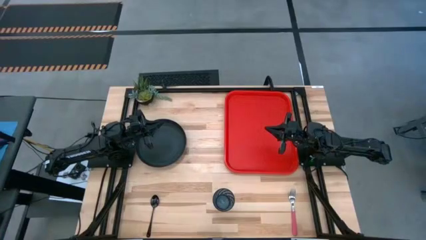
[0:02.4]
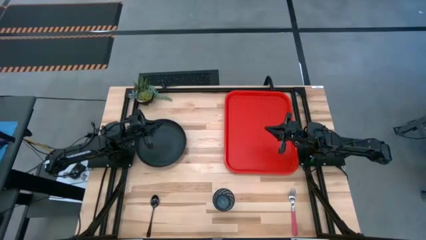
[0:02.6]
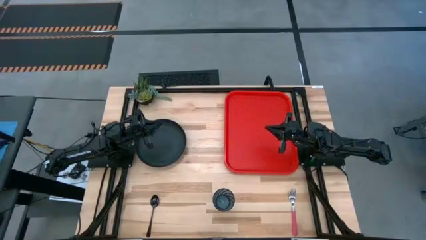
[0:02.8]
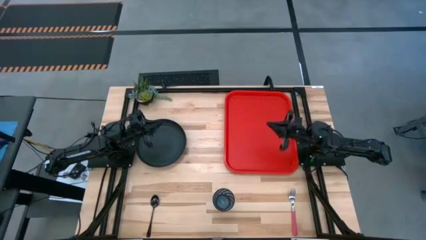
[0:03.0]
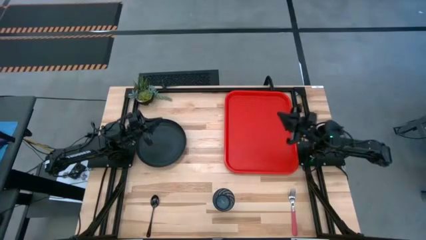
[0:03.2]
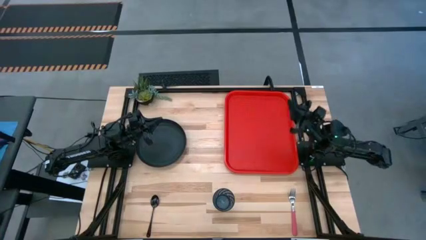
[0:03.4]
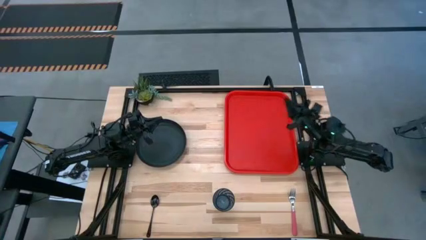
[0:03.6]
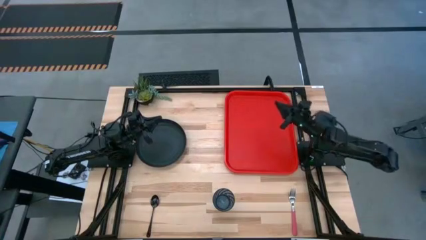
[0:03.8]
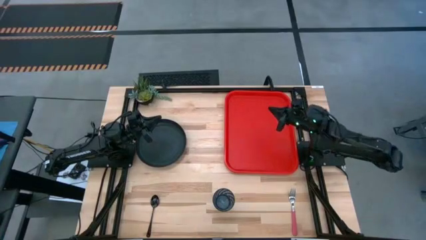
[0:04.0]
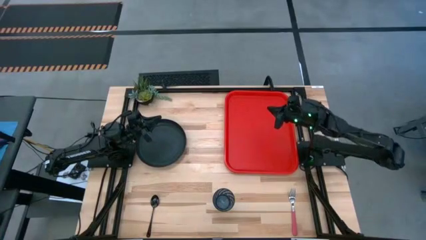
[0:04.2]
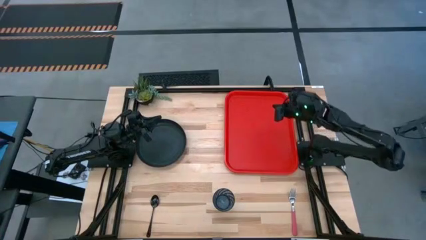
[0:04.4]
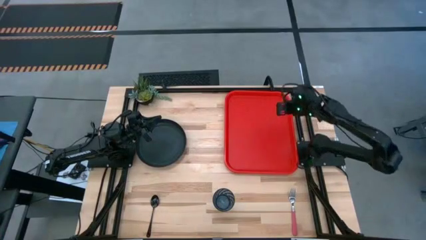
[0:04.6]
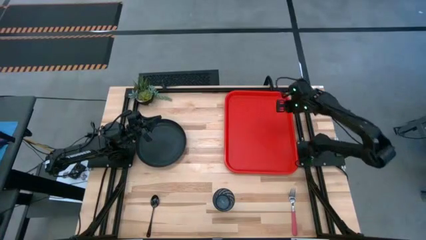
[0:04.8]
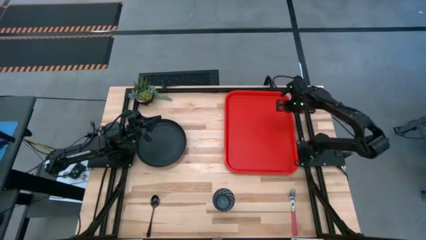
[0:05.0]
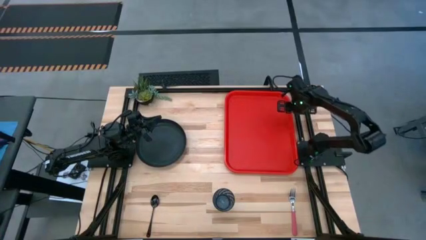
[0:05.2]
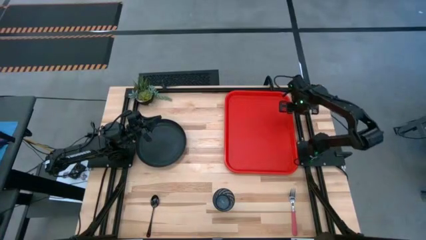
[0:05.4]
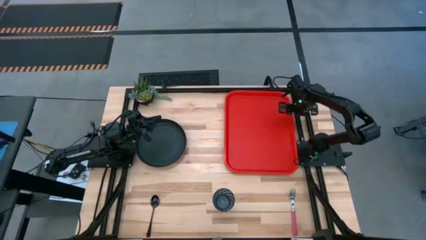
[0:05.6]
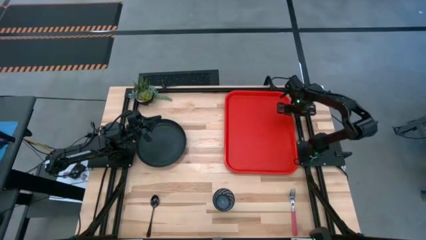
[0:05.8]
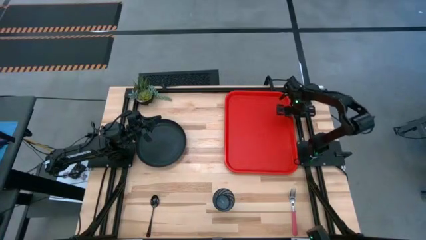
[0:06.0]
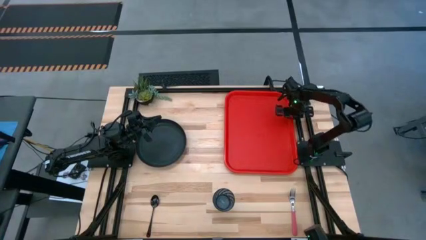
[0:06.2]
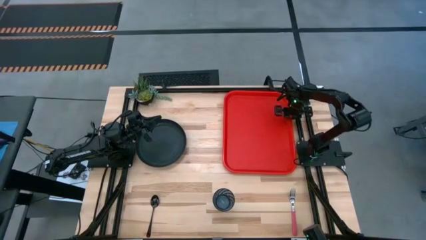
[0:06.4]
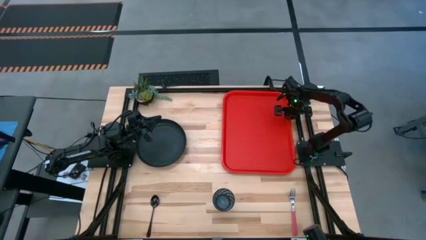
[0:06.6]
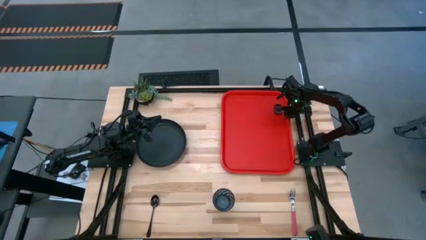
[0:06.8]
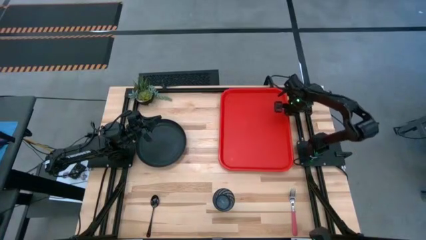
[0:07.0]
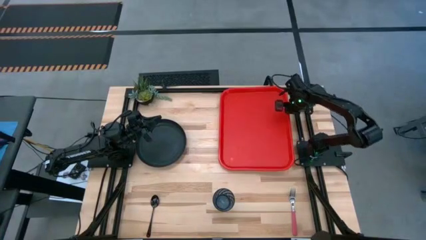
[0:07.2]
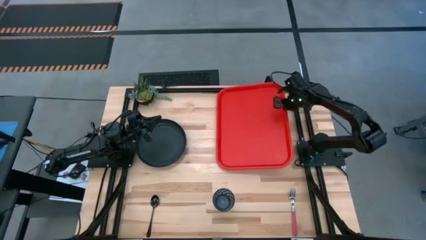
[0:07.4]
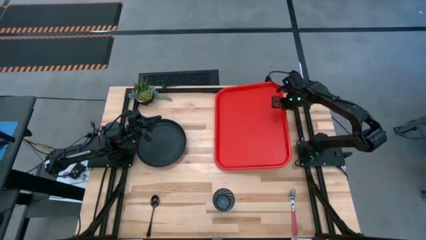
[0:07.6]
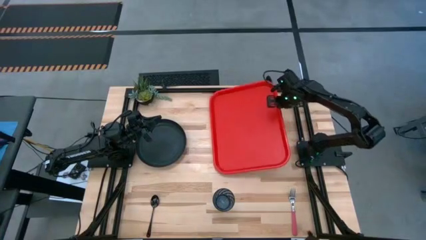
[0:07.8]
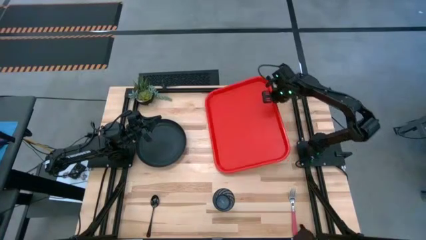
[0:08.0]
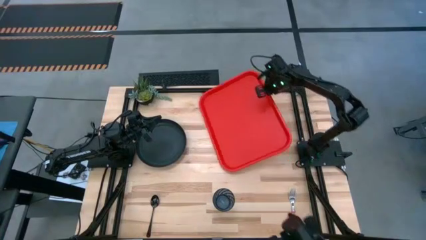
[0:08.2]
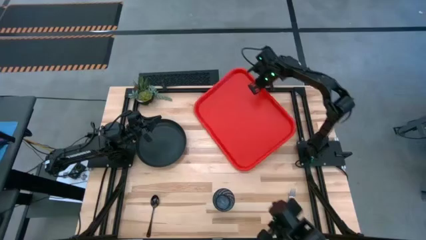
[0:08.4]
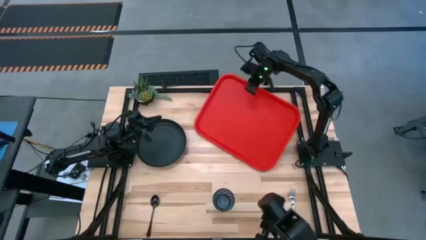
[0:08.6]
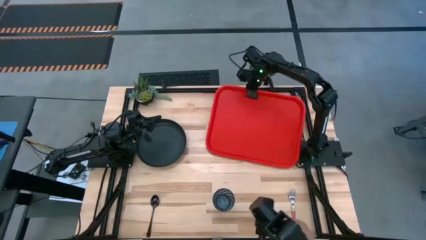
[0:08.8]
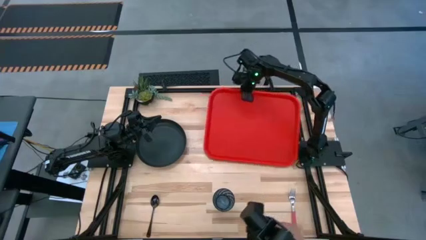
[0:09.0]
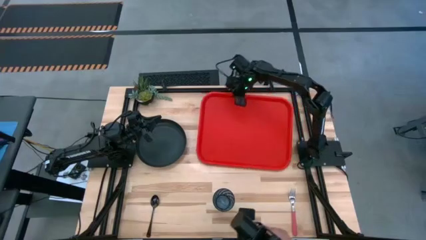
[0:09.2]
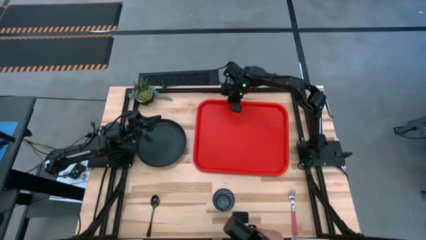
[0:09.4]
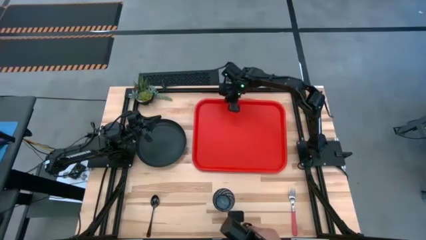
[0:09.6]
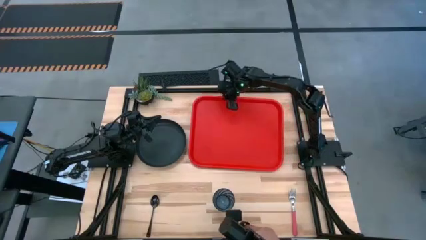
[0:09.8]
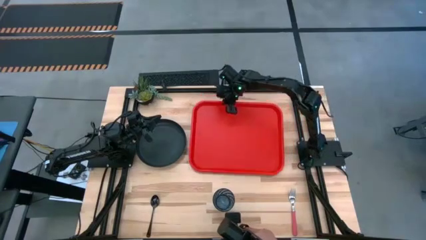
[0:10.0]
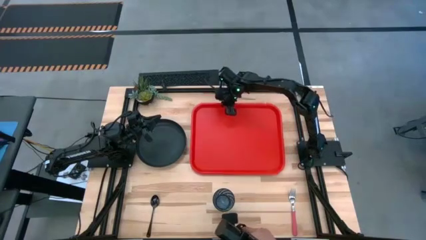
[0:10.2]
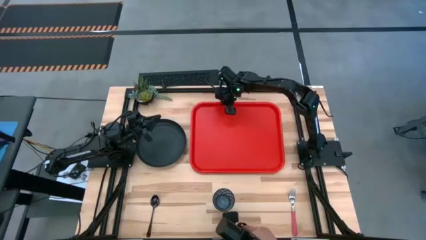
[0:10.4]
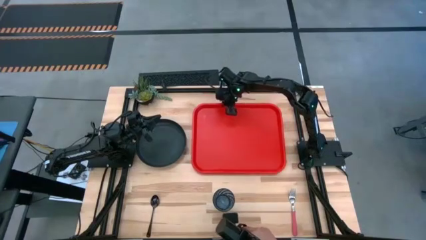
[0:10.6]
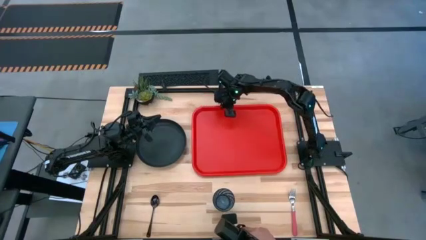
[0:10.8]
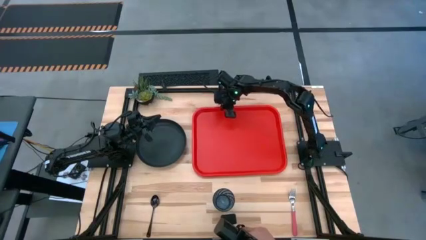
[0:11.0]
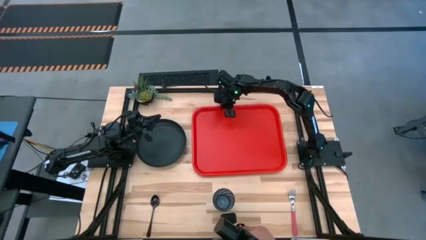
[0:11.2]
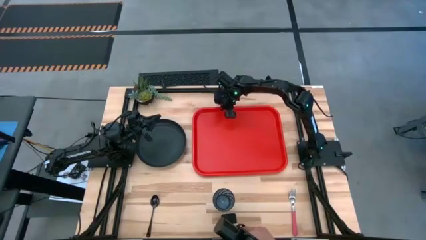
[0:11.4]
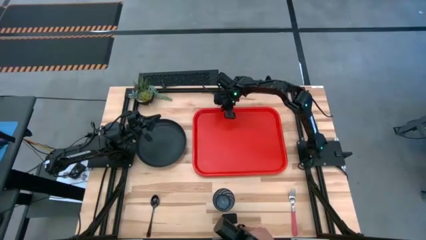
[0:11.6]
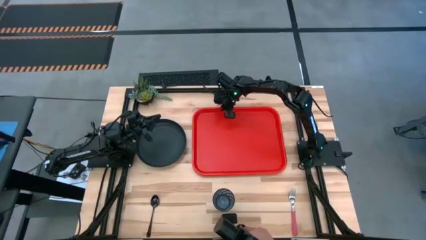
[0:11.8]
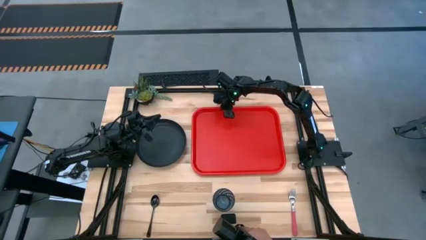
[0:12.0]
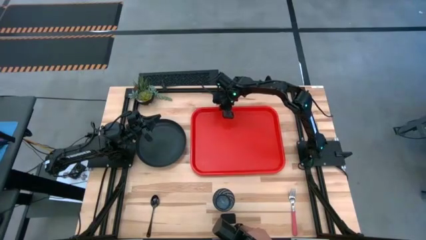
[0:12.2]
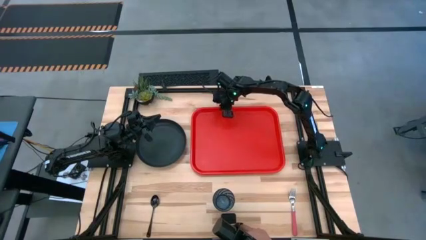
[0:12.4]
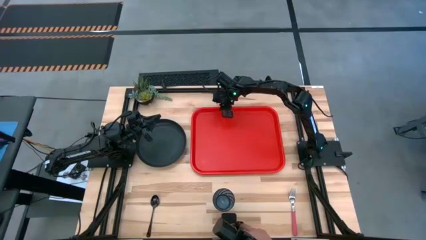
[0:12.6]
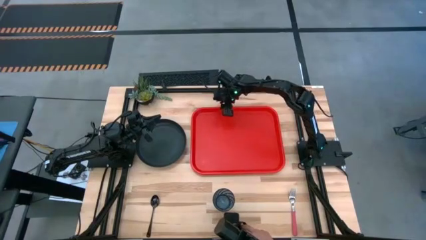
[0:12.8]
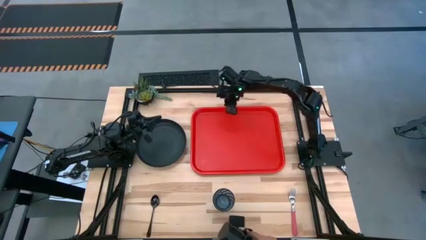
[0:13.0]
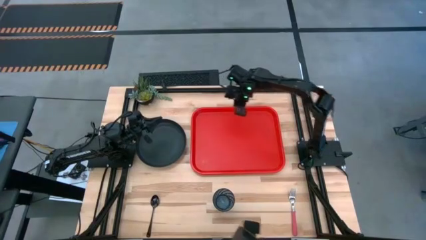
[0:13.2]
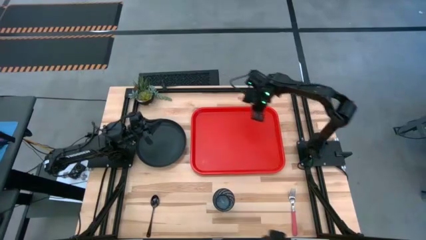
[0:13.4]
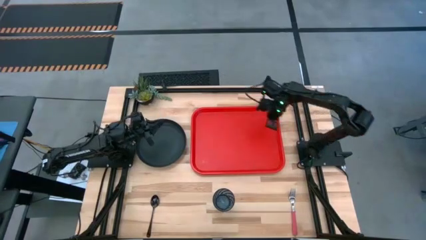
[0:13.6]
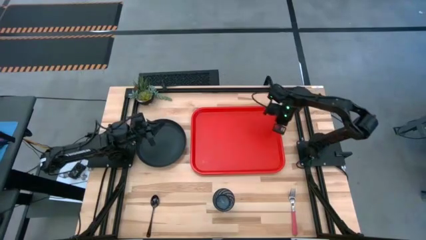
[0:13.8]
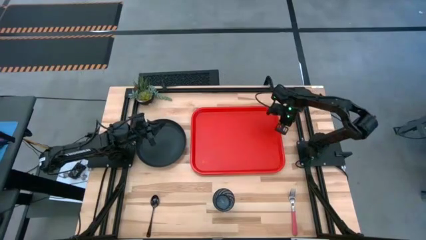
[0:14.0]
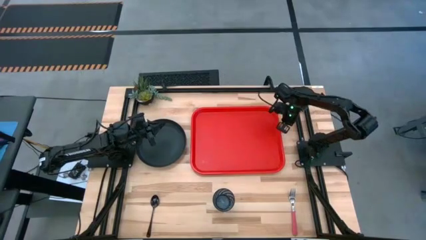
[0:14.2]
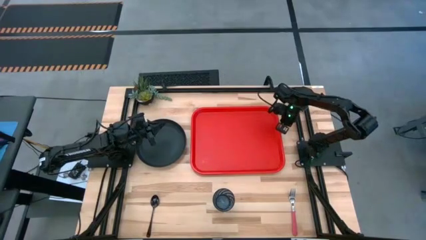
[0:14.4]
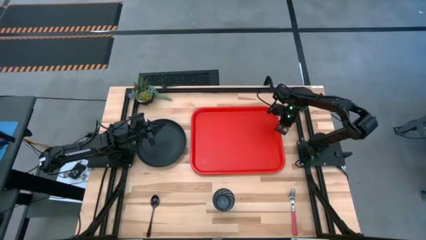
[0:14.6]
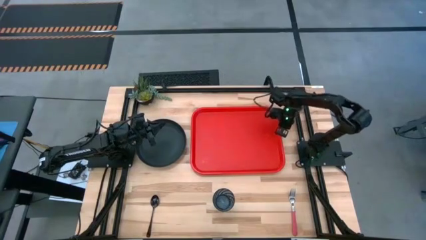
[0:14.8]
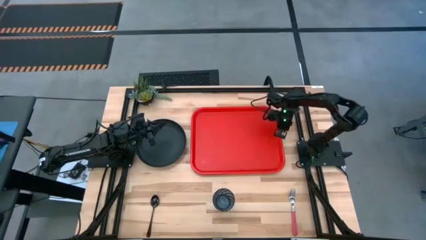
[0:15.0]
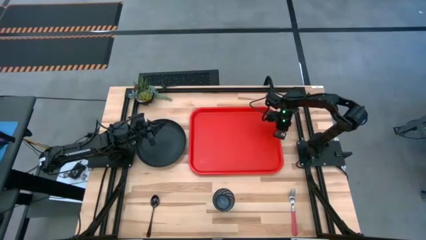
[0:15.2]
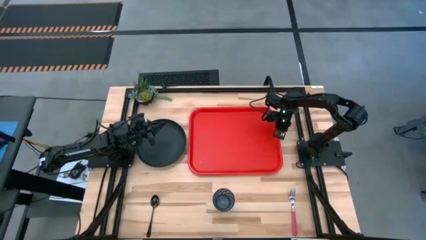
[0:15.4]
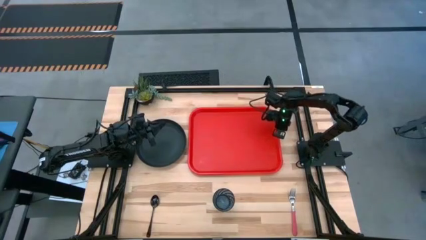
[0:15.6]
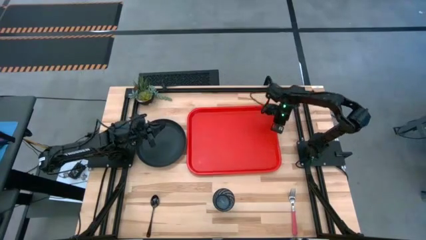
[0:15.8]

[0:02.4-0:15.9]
Task: Pick and place plate/cup/fork/spoon on tray
Prepare the red serving tray

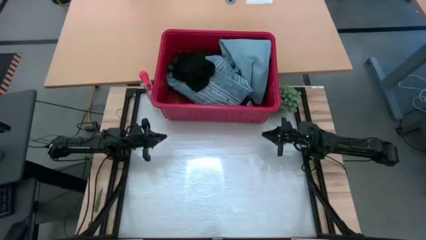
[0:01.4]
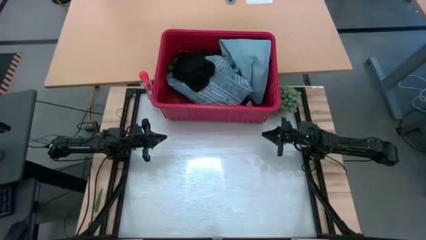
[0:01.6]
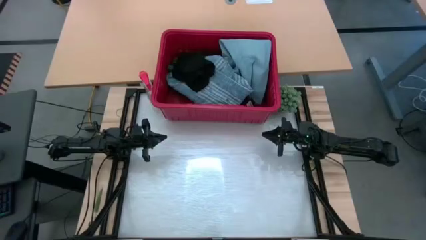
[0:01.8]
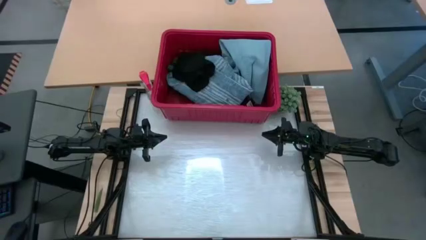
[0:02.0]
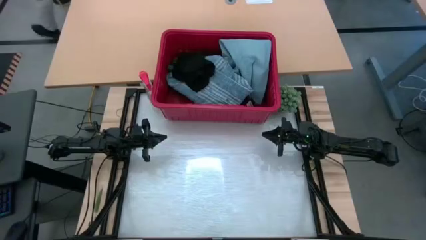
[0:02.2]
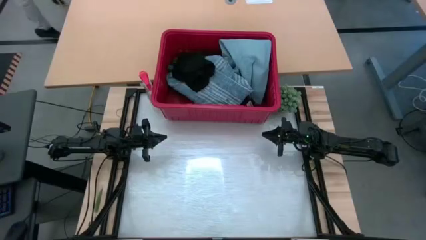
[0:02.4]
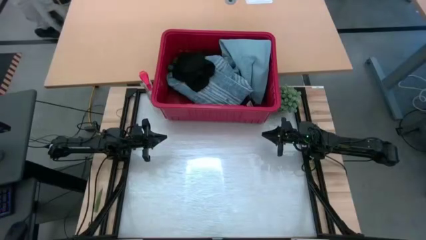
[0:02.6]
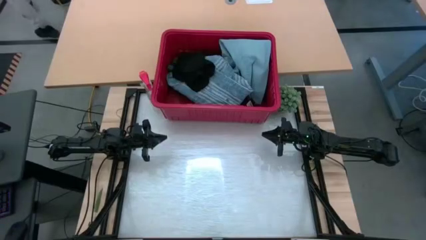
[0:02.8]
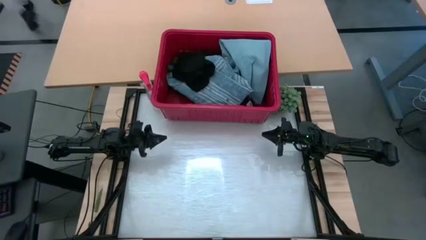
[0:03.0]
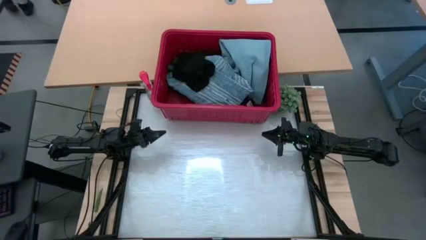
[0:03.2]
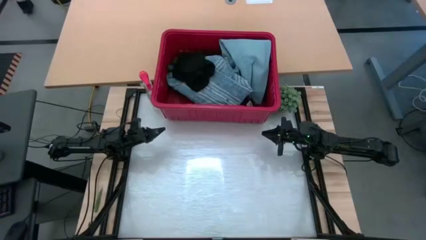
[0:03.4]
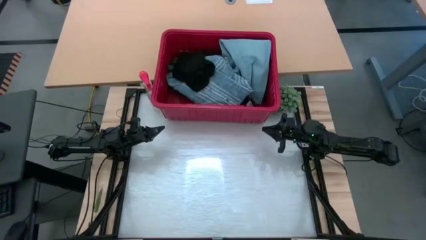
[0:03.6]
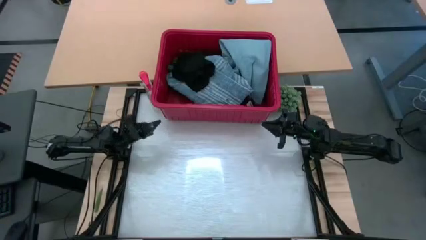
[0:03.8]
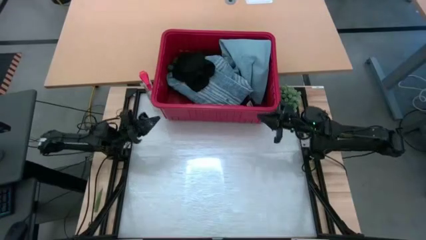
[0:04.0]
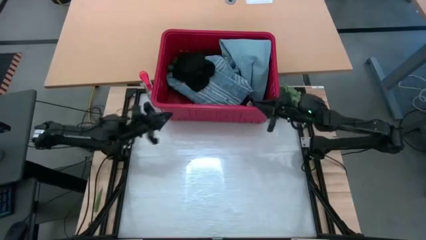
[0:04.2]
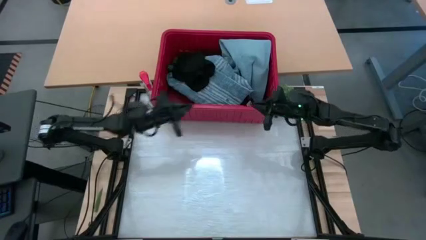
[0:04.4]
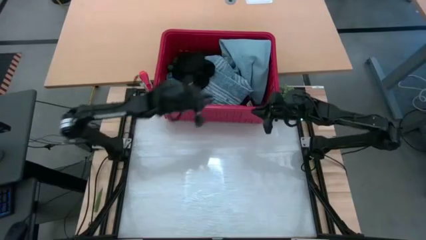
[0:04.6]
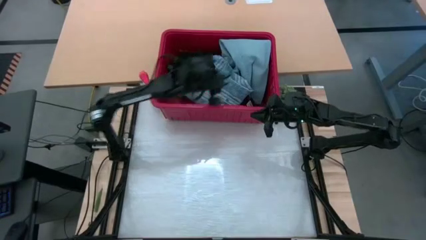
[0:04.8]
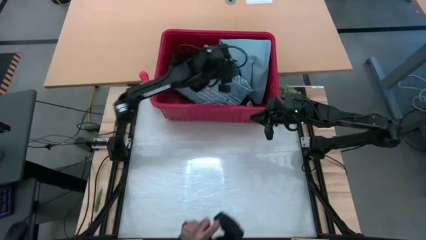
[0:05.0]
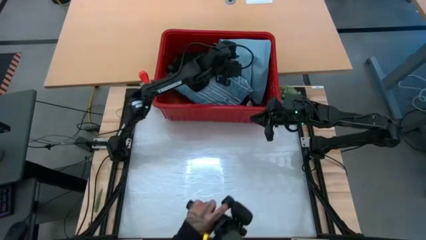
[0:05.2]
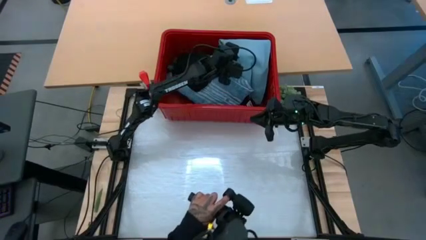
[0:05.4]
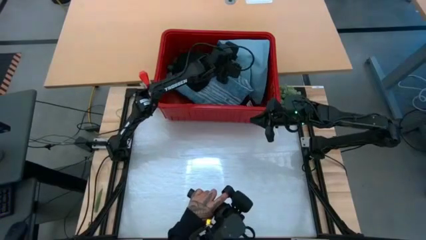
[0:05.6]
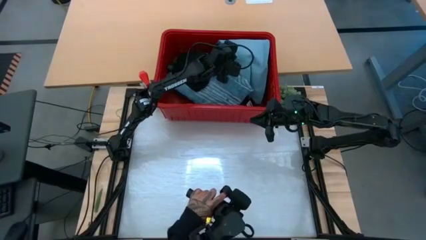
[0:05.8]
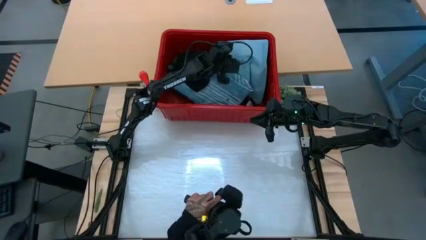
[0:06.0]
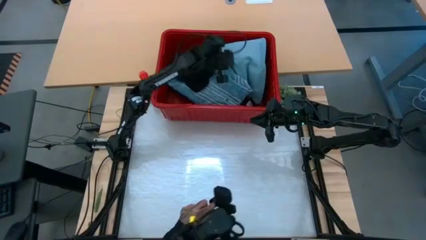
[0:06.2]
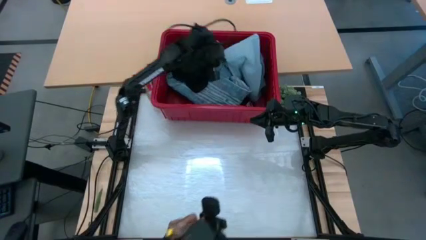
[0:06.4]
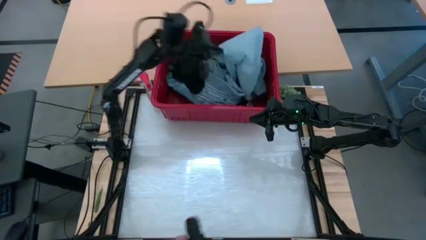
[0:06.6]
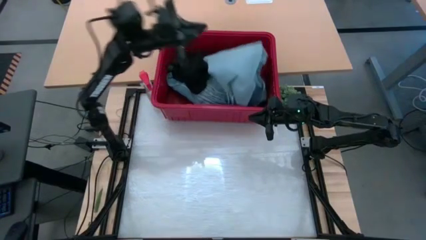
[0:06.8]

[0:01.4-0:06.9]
Task: Fold Laundry from Bin
Remove the light blue pants from the red laundry bin
